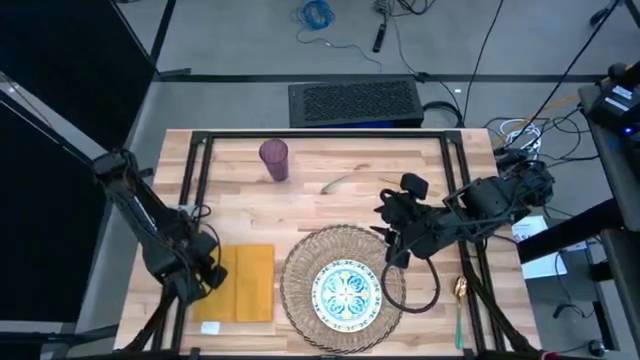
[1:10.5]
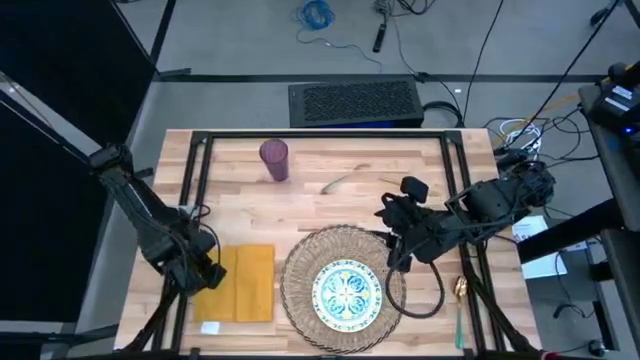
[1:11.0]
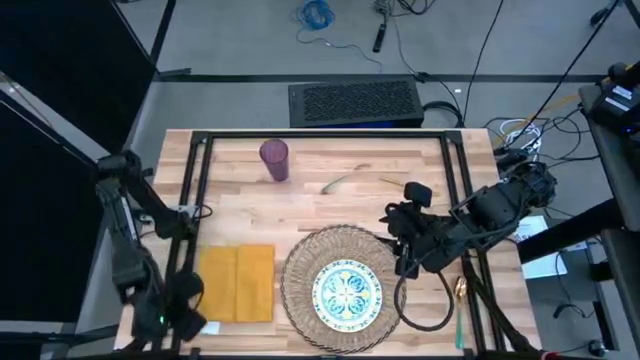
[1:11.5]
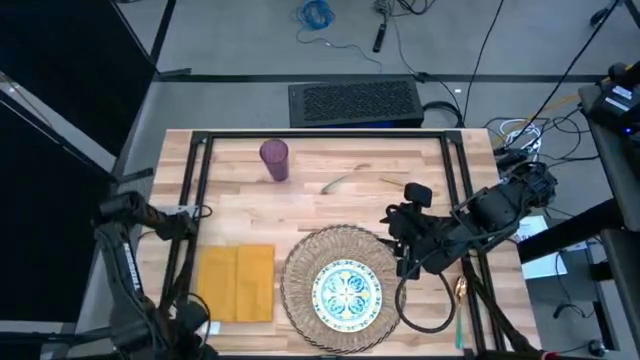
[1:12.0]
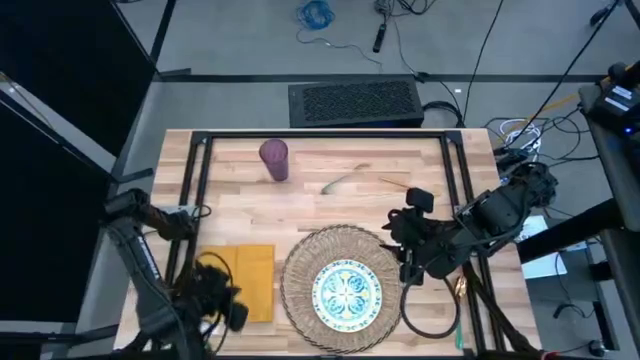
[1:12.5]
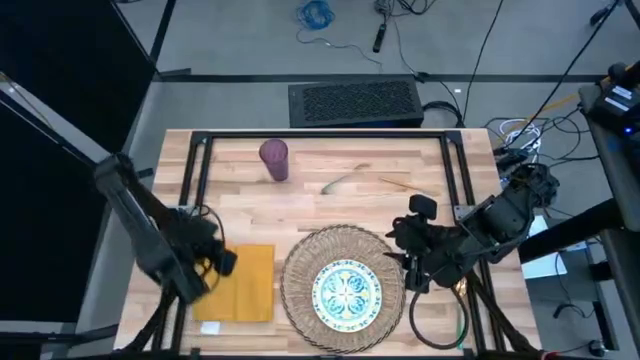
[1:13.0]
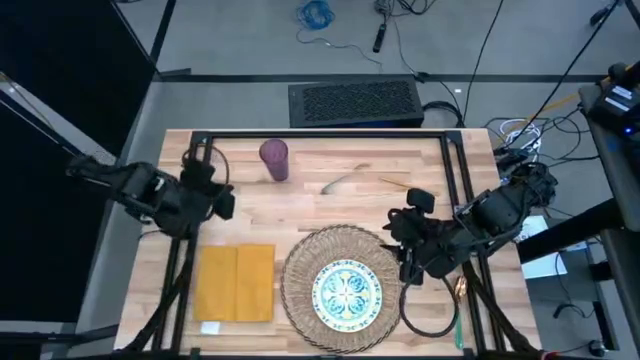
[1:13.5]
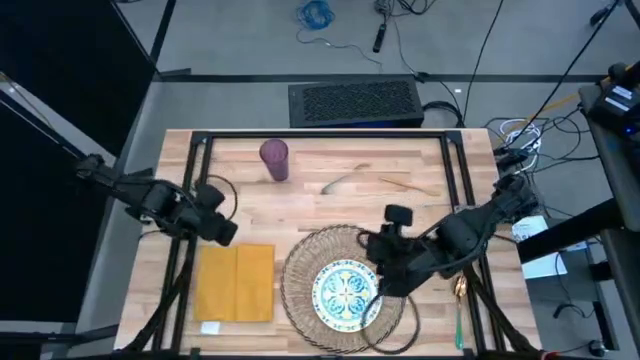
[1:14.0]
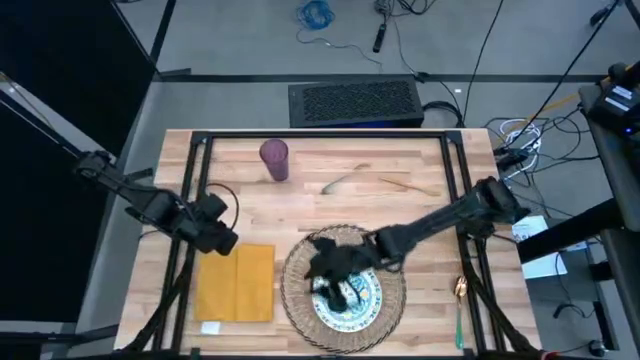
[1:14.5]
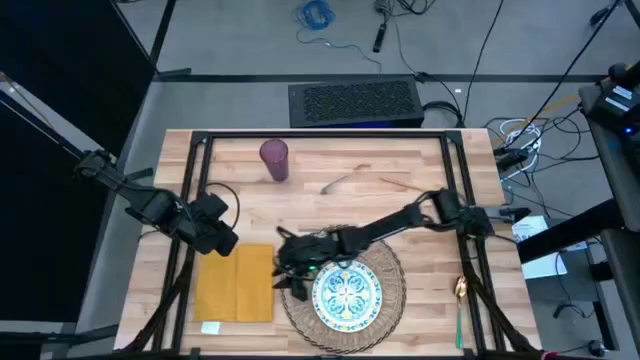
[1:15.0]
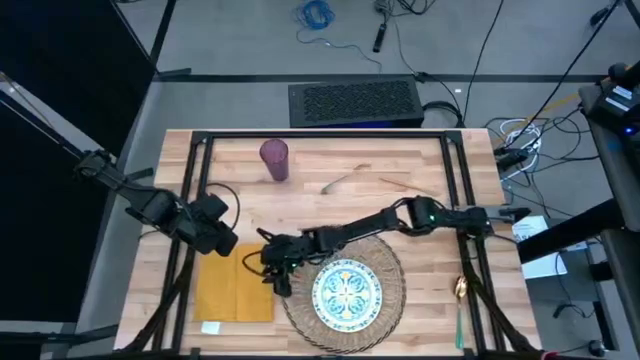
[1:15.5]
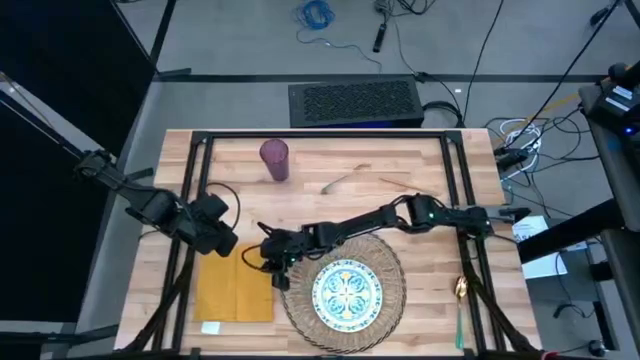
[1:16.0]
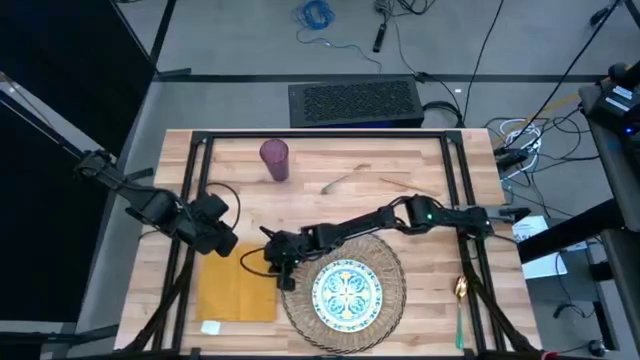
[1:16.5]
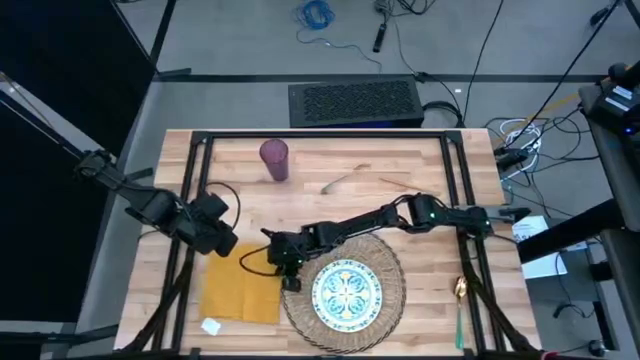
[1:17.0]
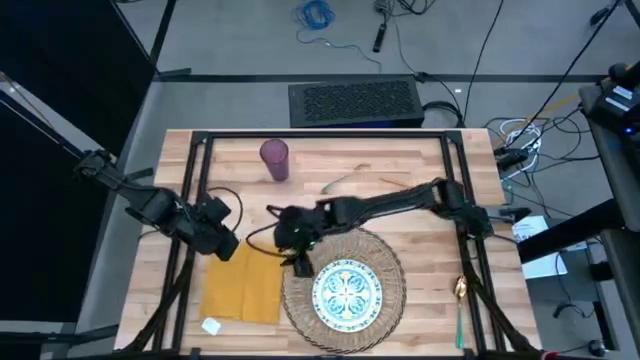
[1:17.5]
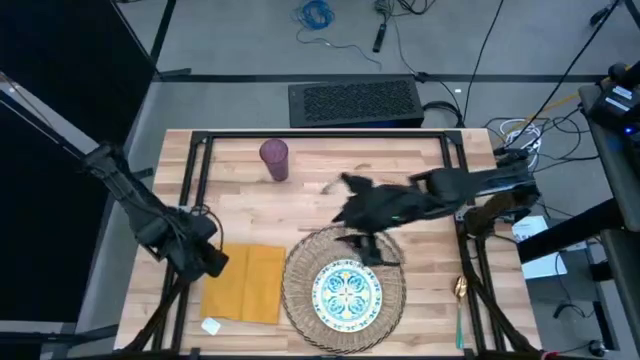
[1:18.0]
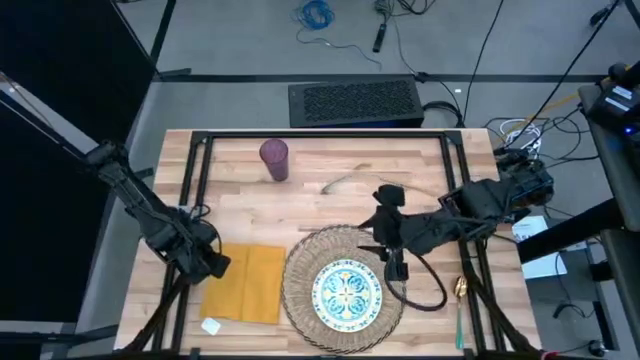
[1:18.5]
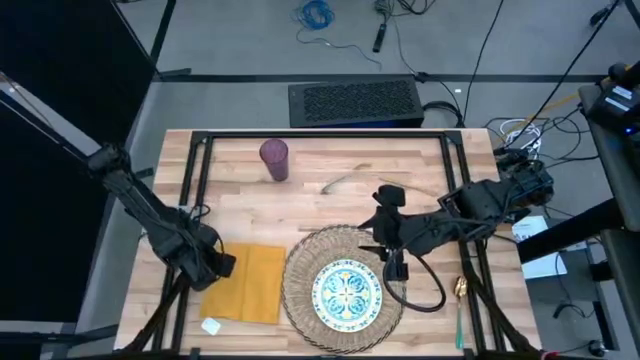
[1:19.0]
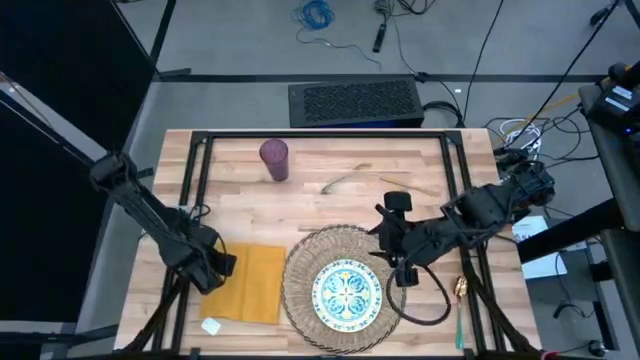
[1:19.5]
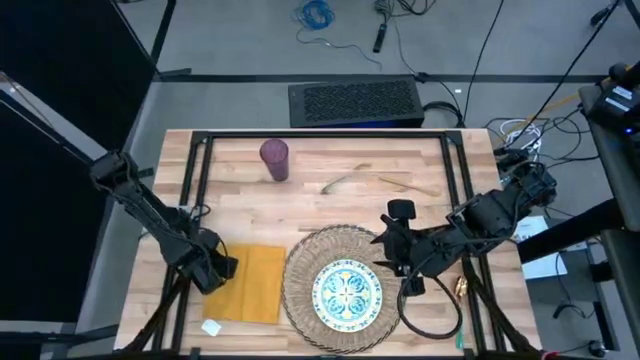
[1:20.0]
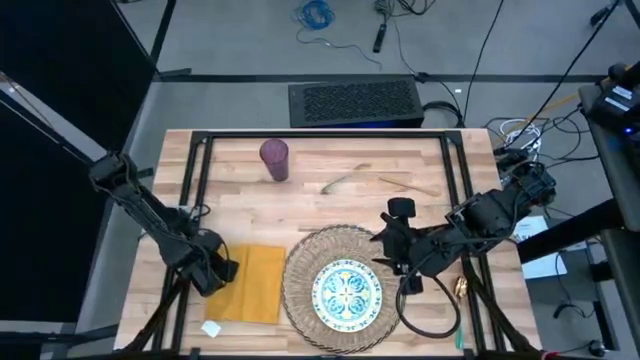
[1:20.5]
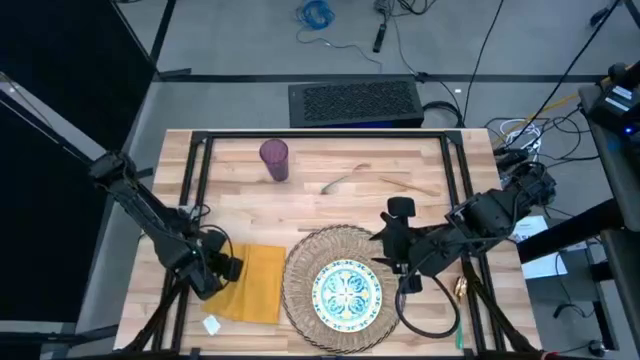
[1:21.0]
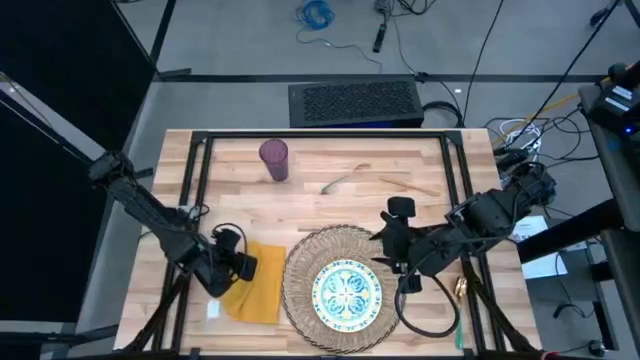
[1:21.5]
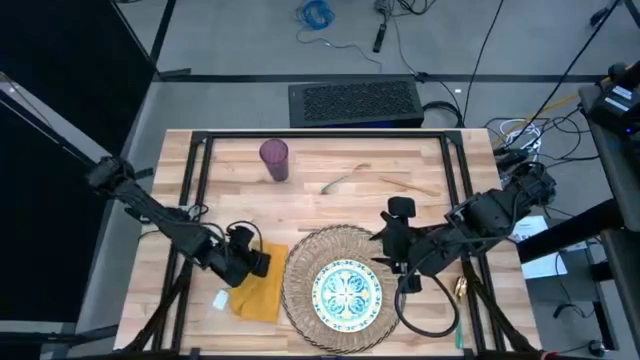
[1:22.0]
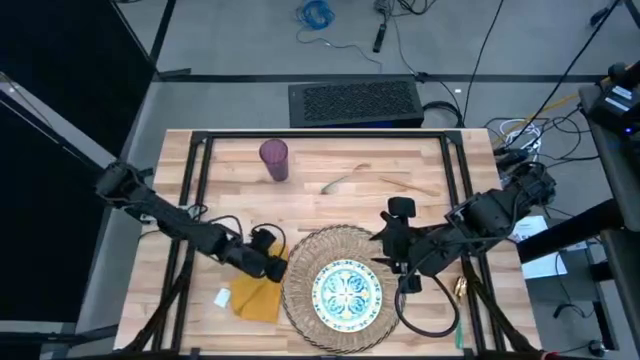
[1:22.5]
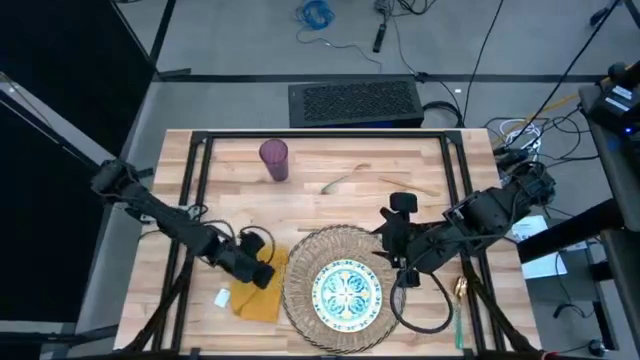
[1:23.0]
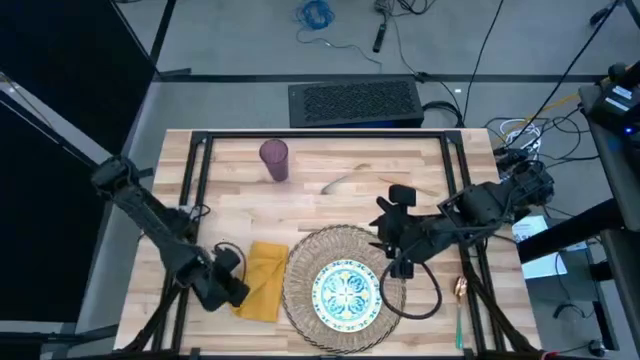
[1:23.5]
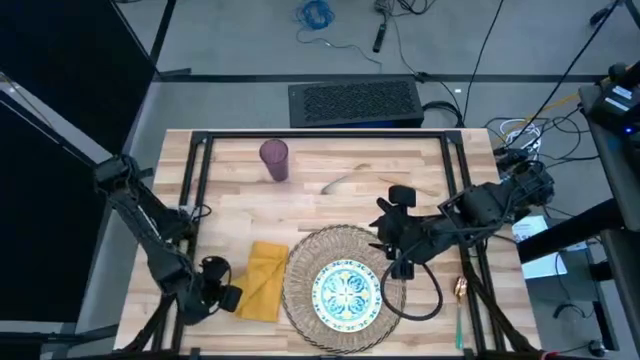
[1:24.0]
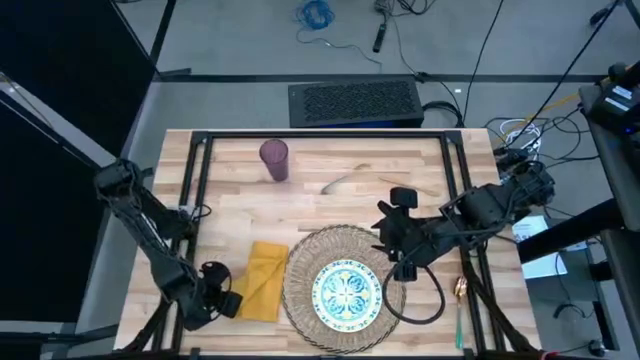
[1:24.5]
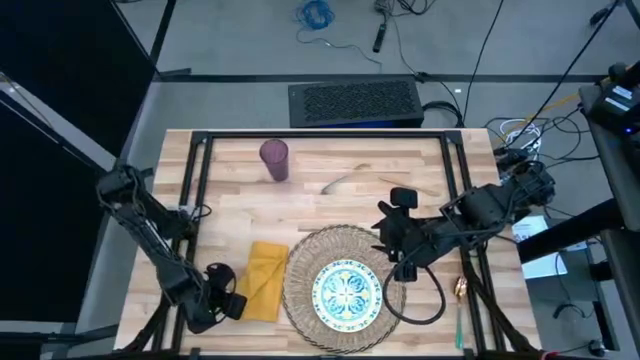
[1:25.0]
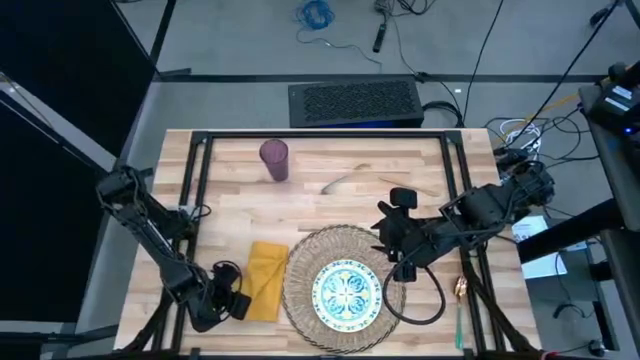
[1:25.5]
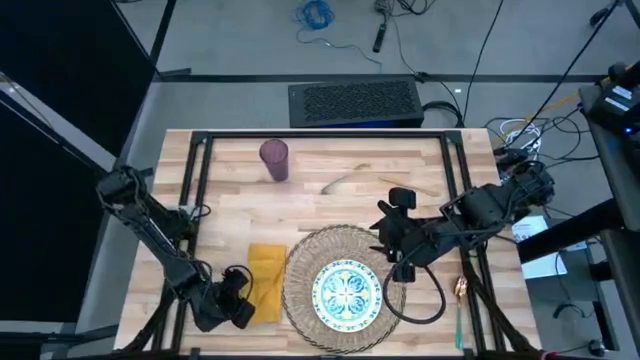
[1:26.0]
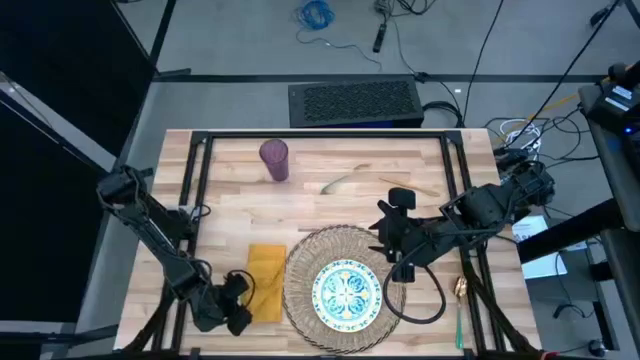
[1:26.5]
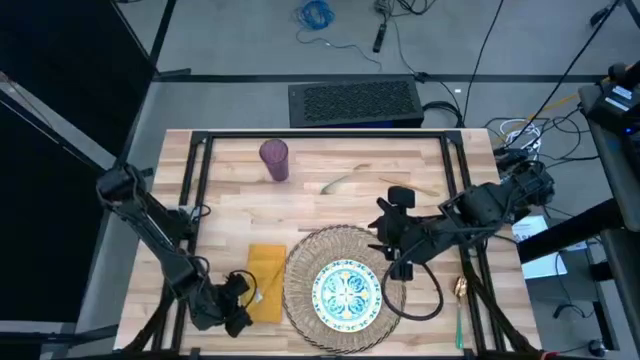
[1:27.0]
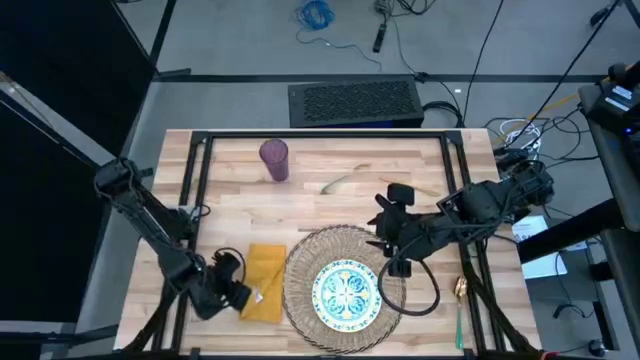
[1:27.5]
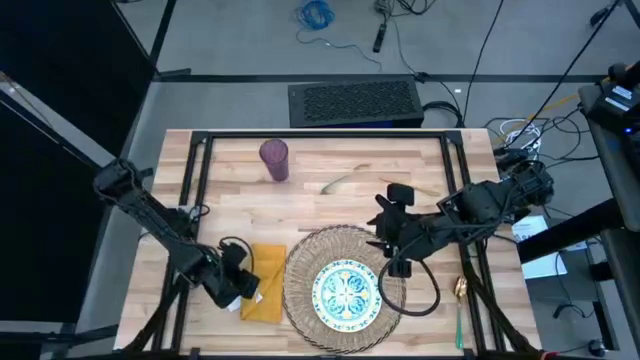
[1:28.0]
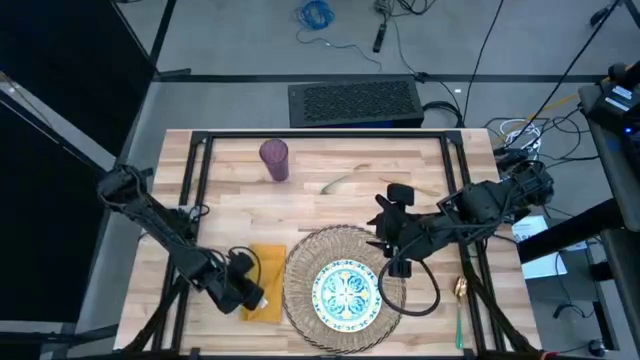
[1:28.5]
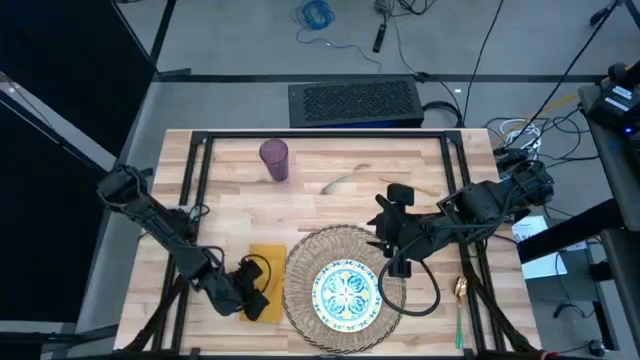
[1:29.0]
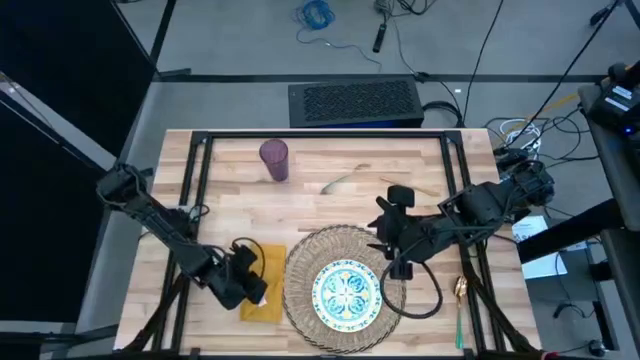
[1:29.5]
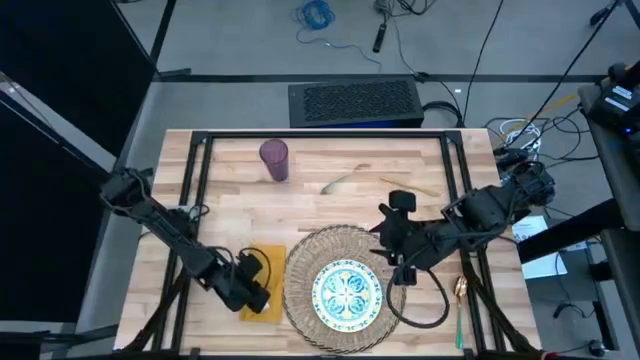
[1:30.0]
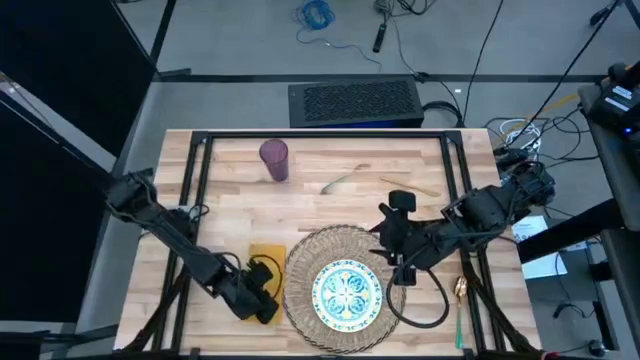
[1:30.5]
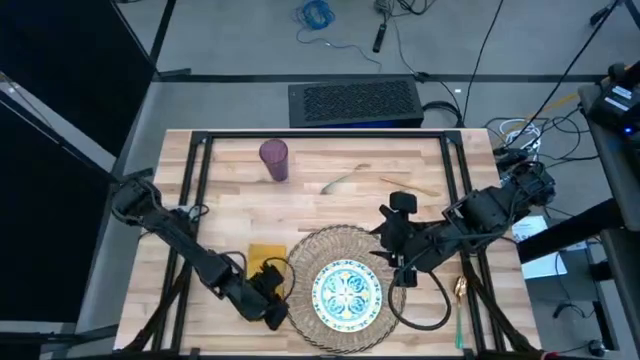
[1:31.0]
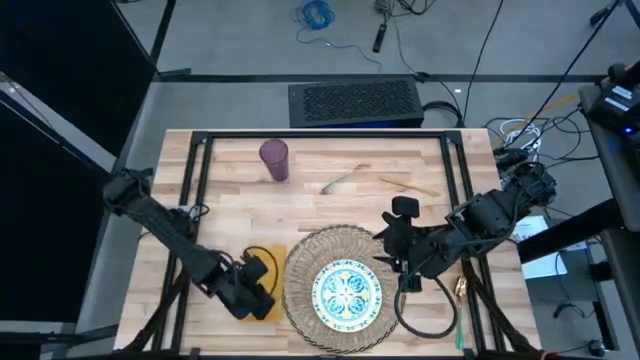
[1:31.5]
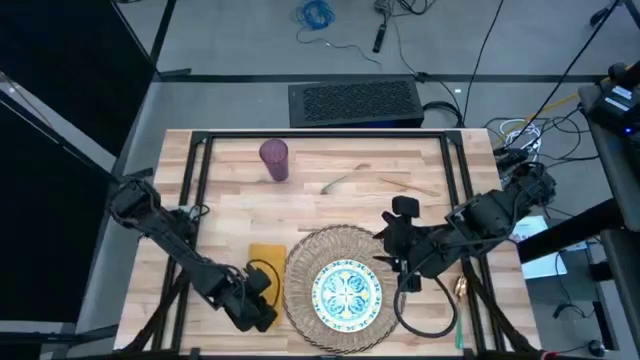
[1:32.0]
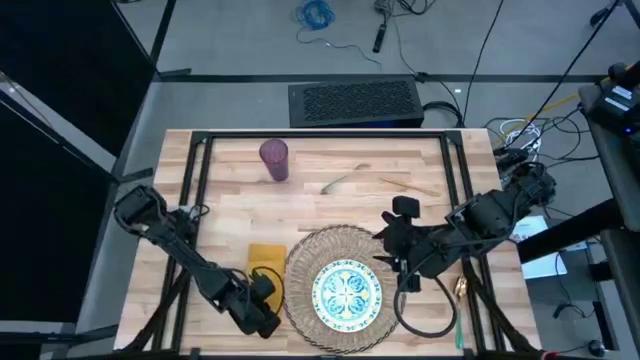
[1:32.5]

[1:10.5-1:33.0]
Task: Set table place
Fold the yellow table napkin
